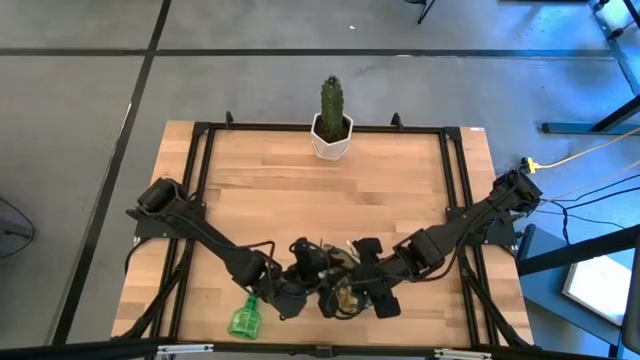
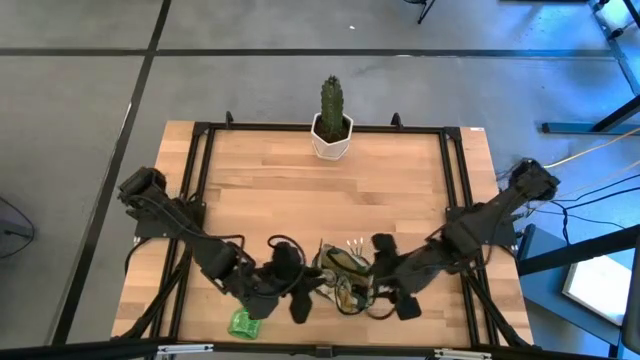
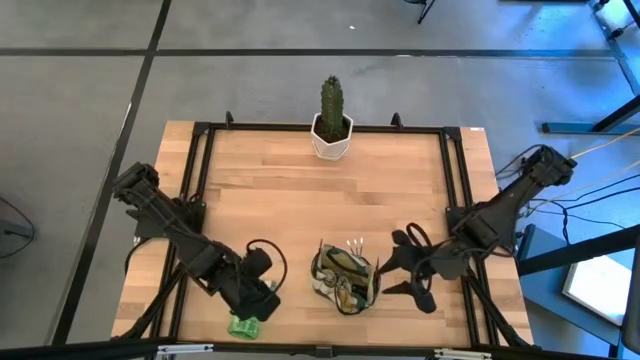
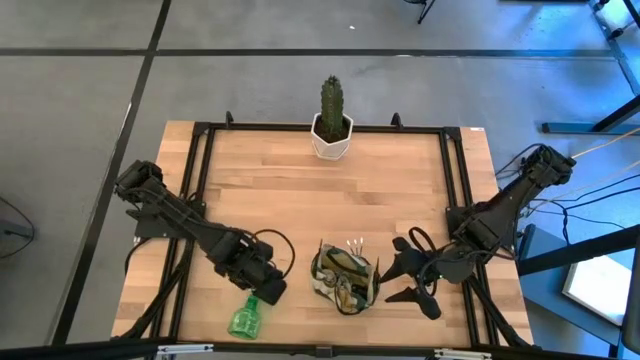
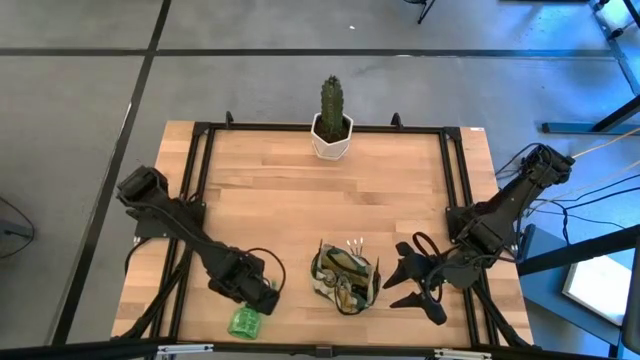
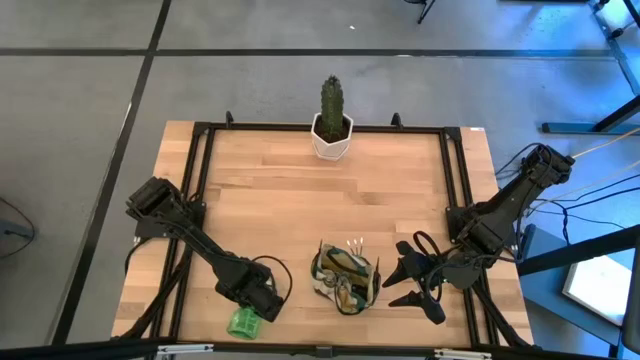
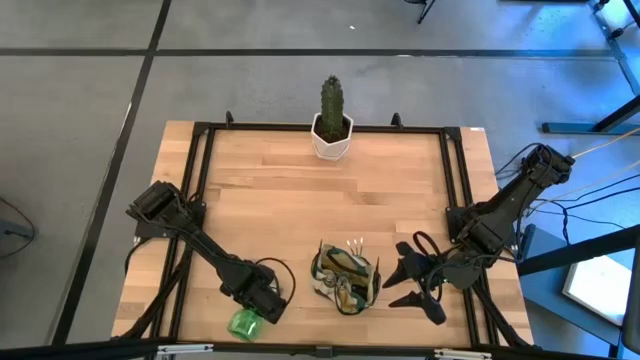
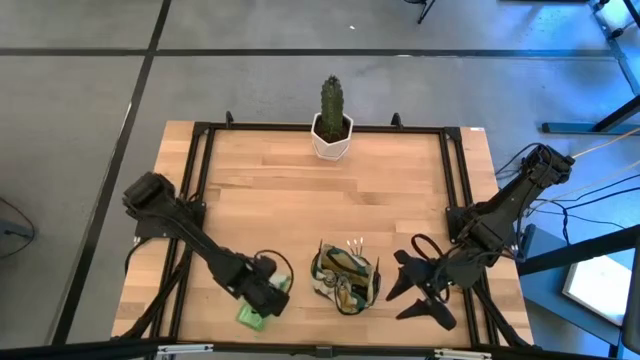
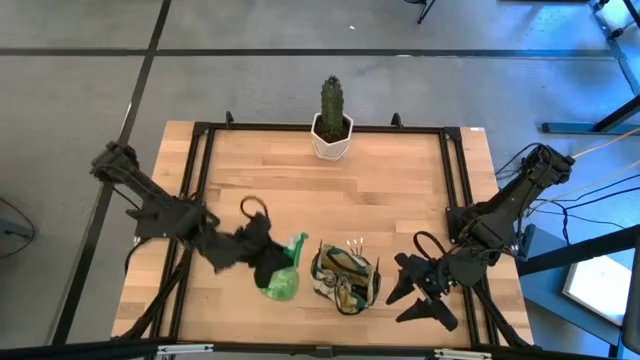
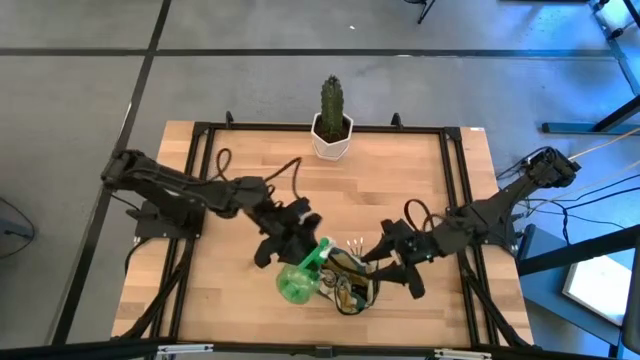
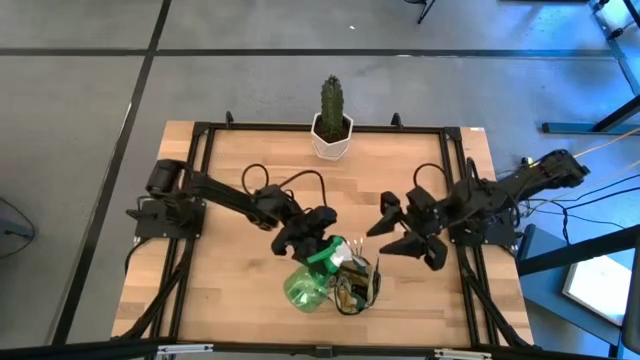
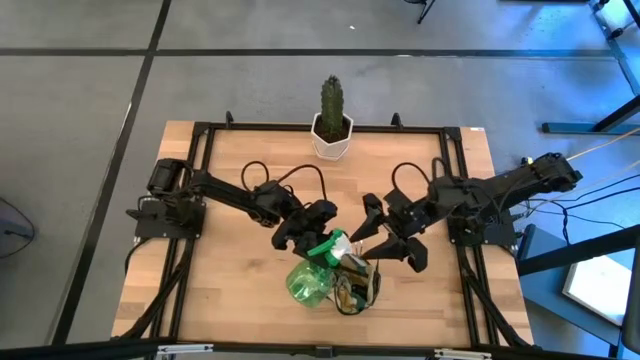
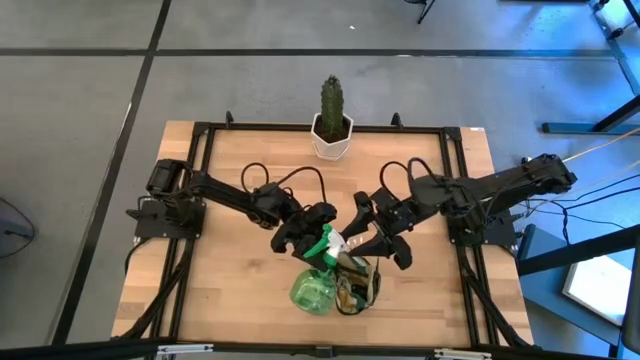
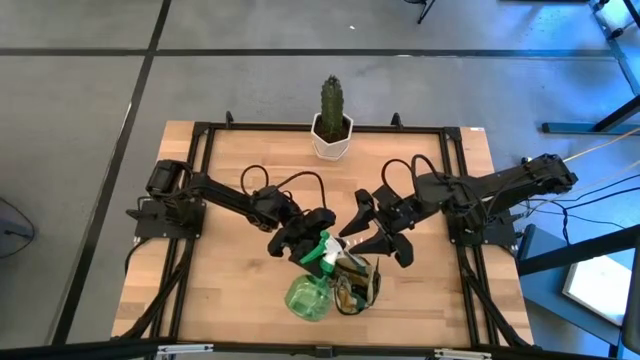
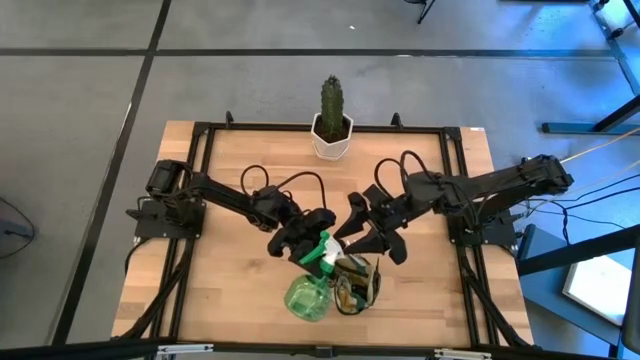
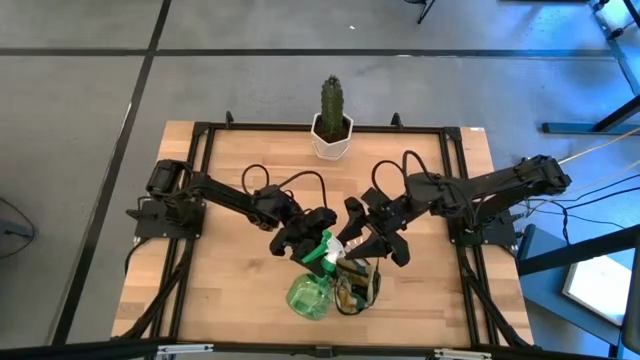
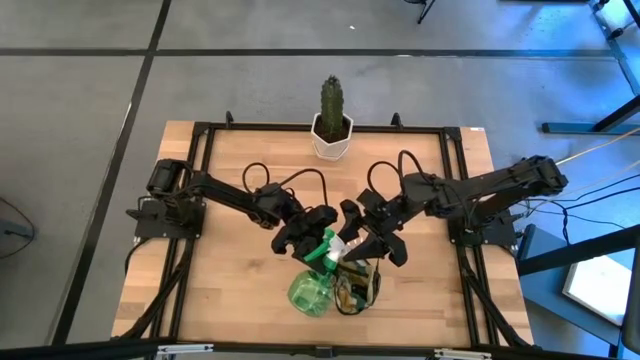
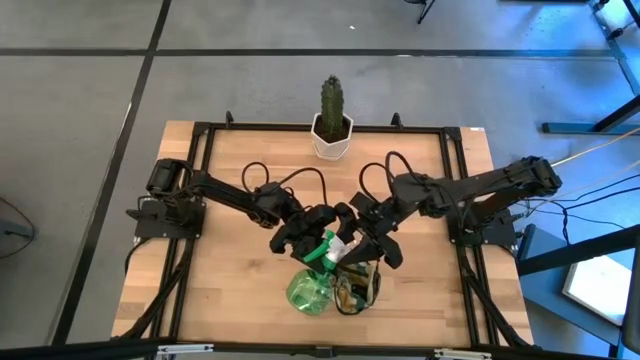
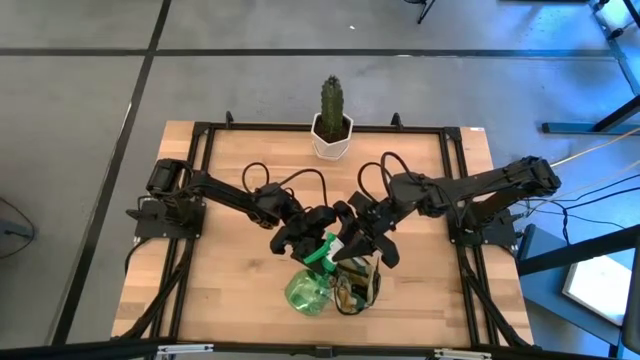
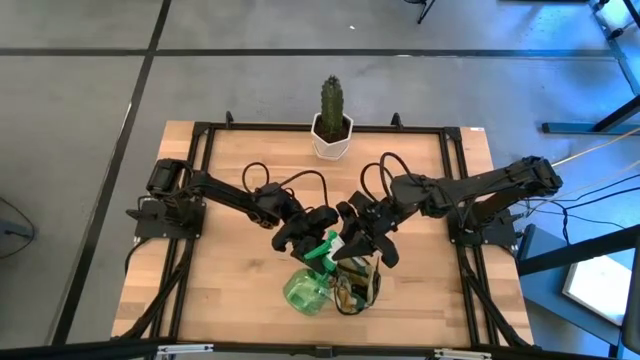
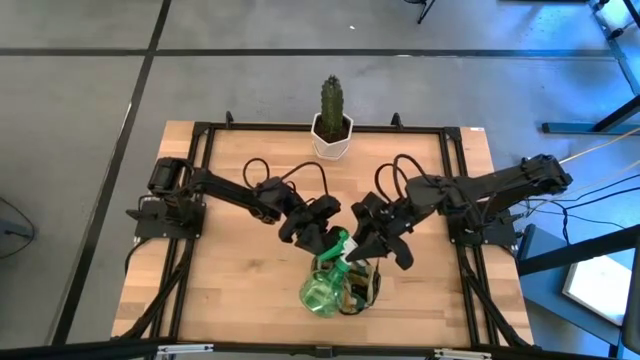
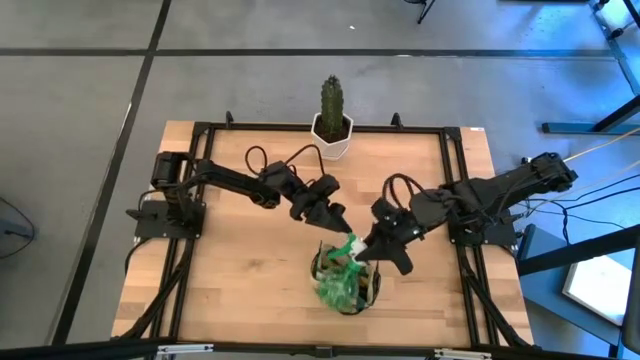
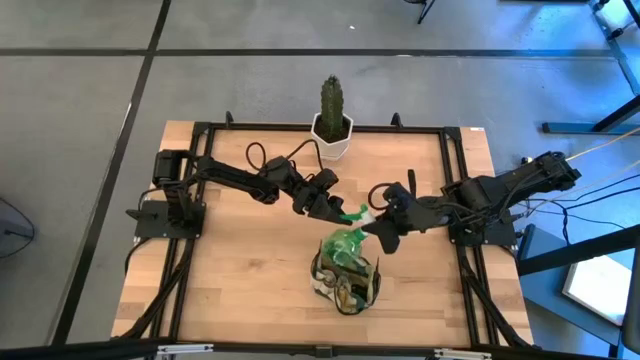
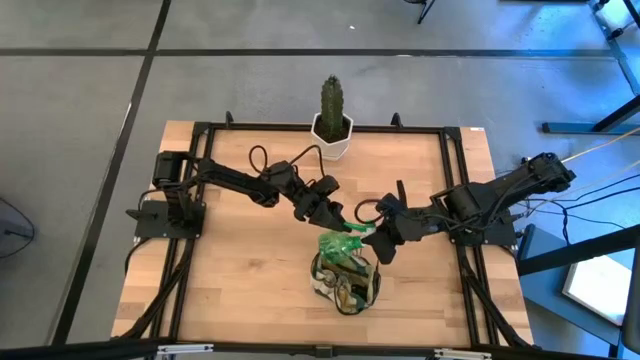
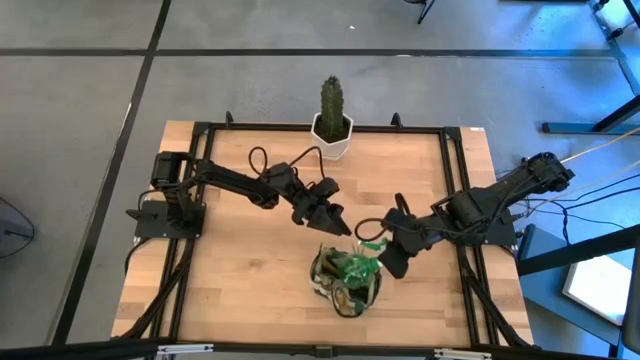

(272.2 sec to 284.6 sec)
Task: Pick & Place Garden tools in Gardening bag
Put the green spray bottle into the green gardening bag

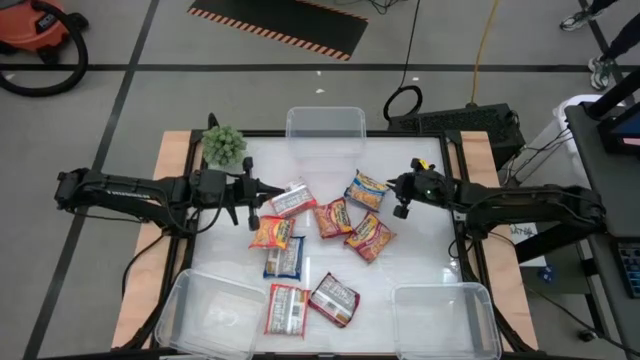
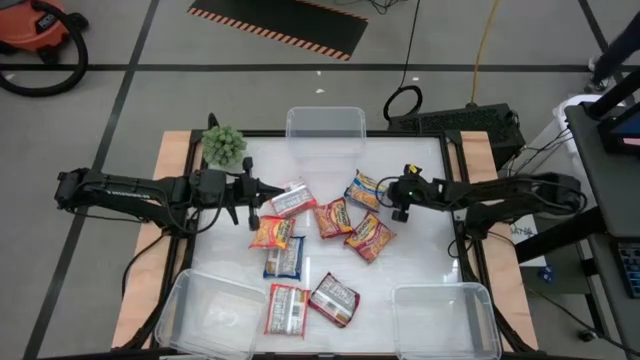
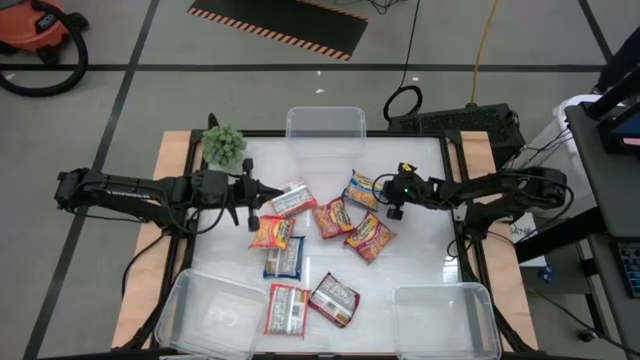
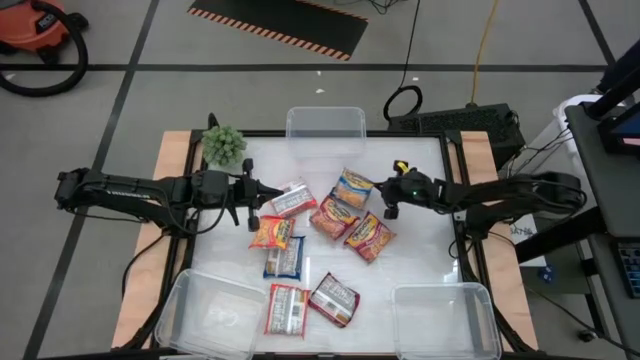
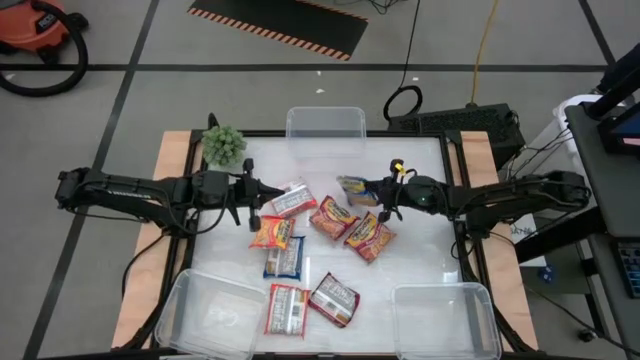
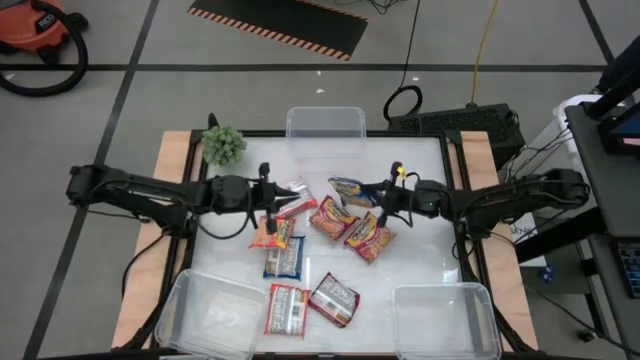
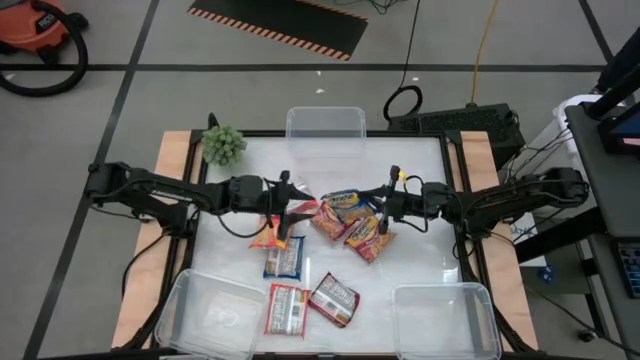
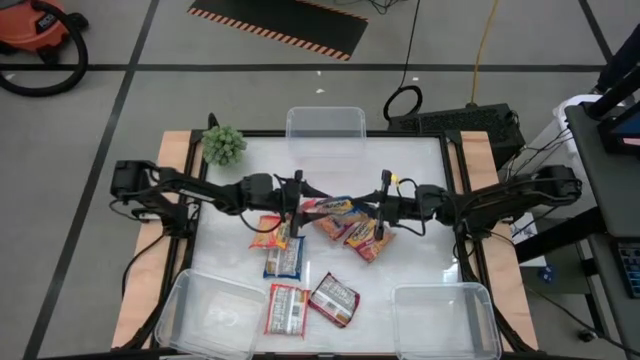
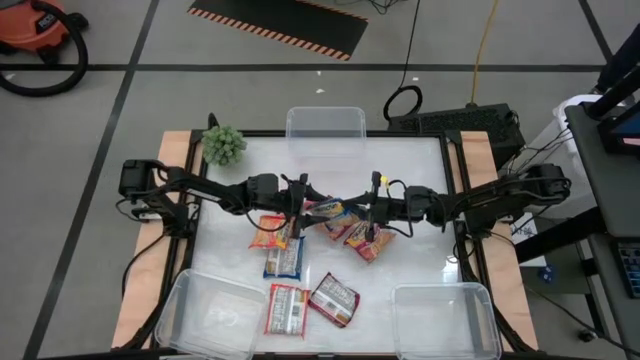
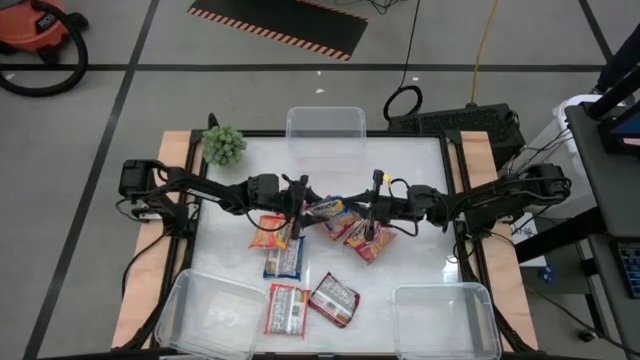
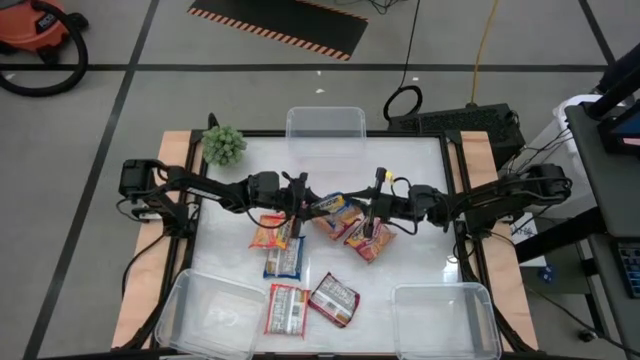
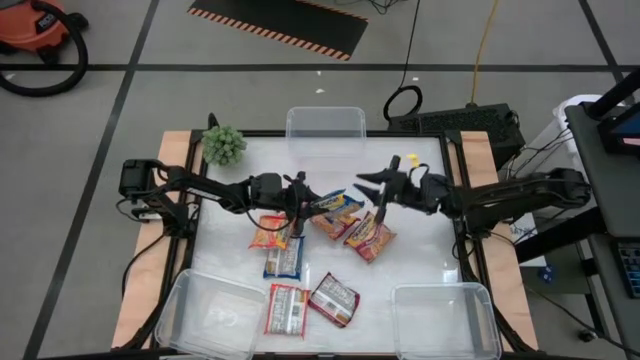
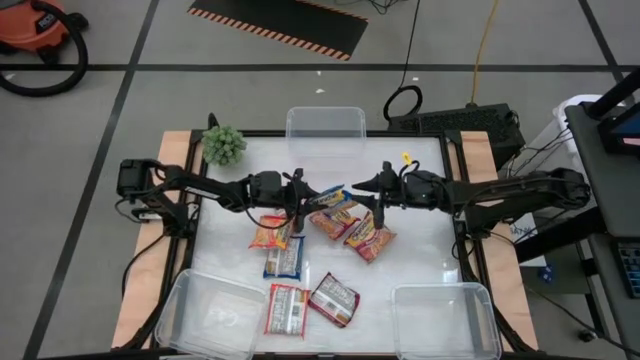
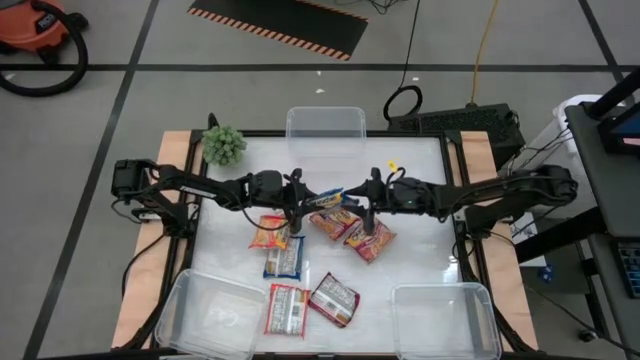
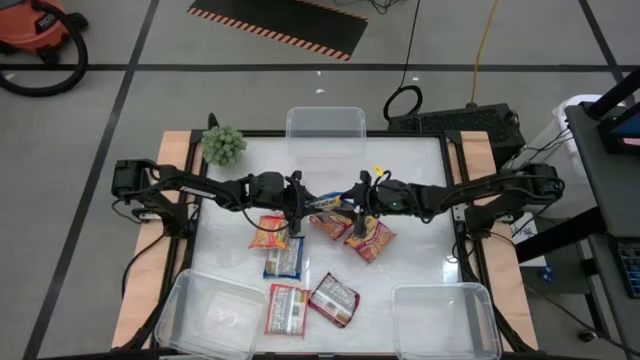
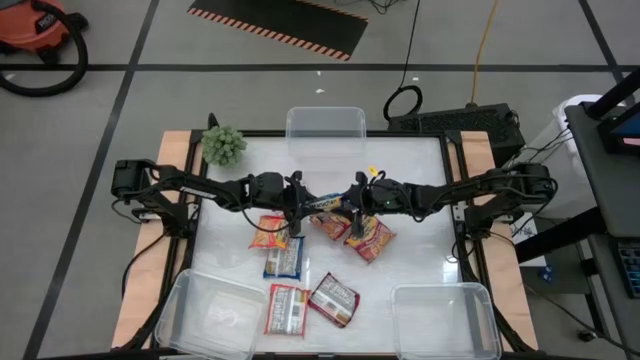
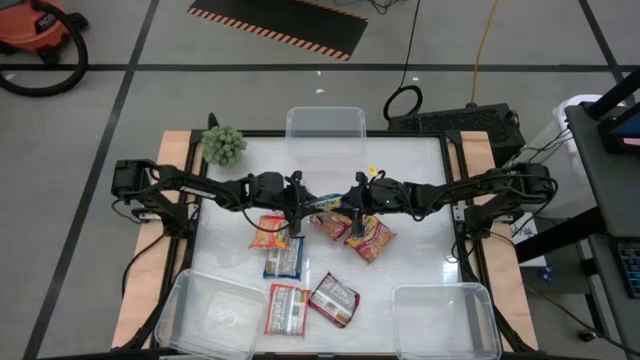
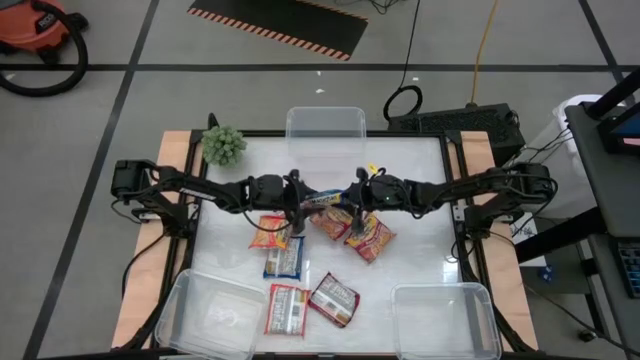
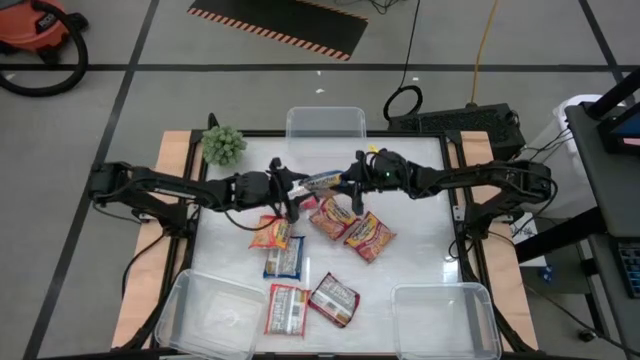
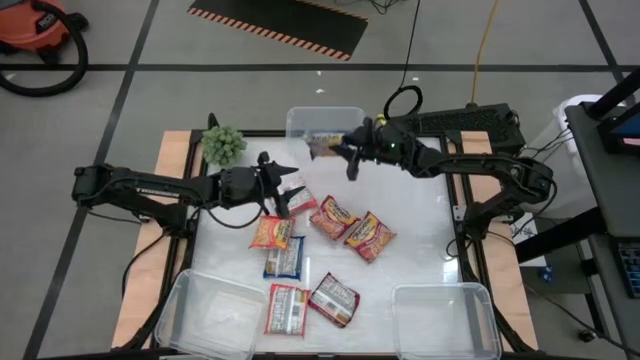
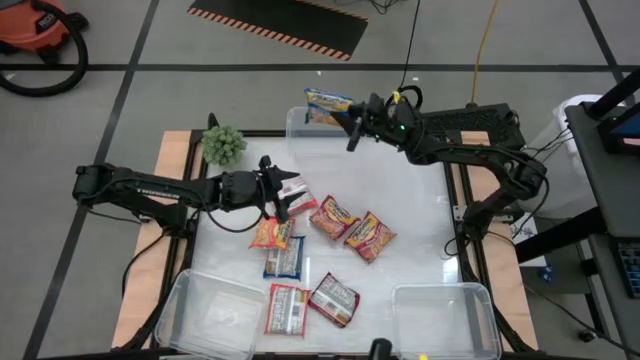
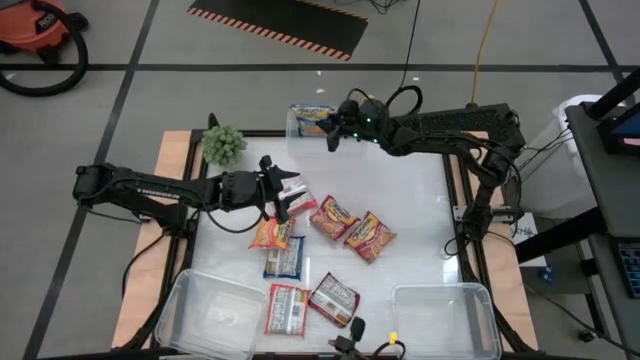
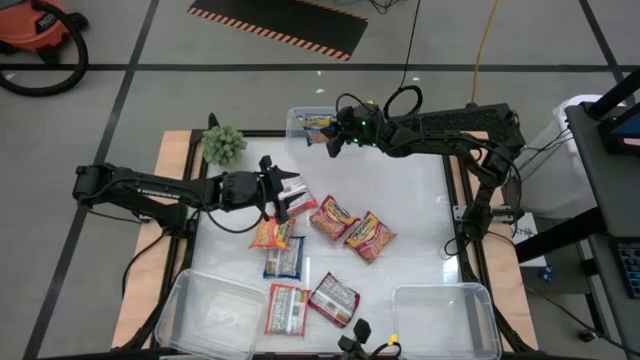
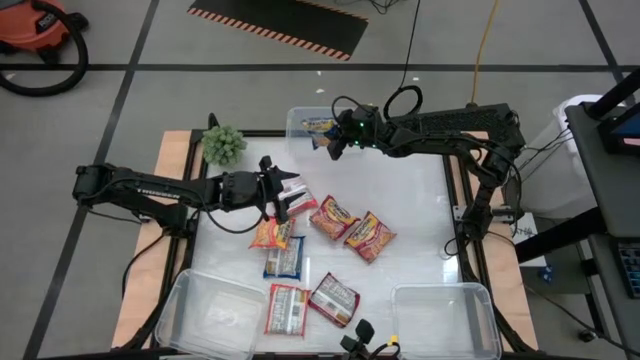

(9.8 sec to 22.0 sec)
Task: Sort Maruchan noodles
Put the top blue noodle pack into the top transparent bin
